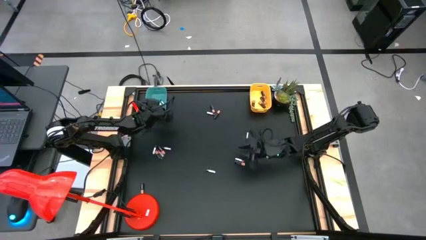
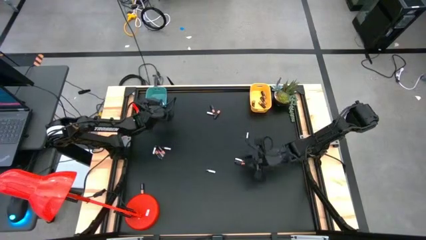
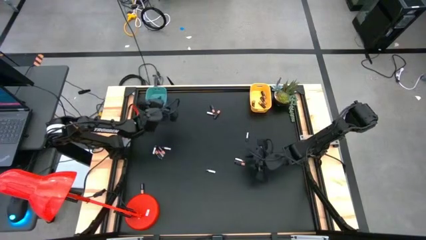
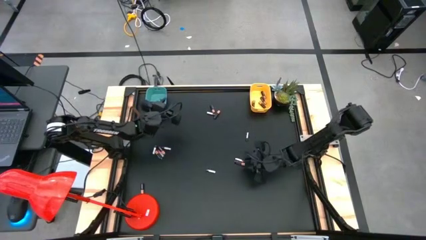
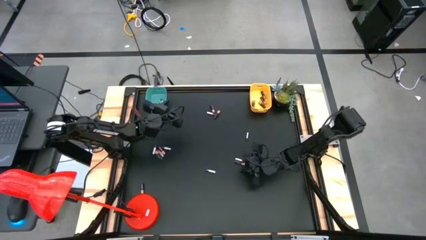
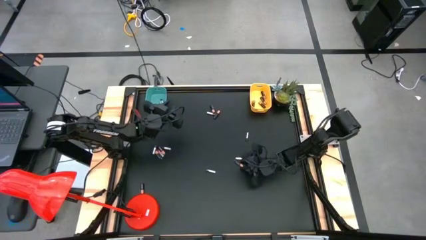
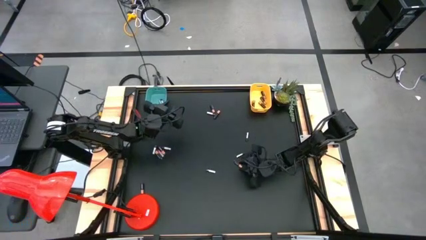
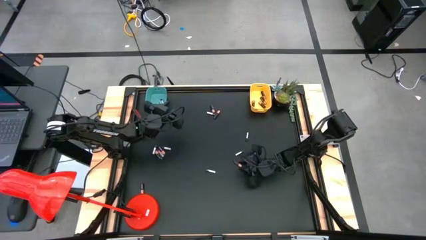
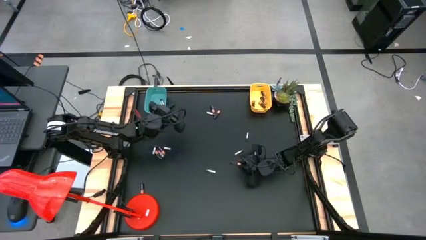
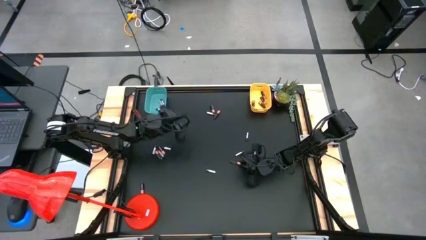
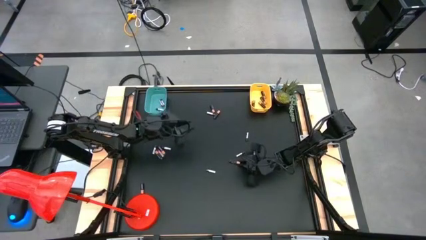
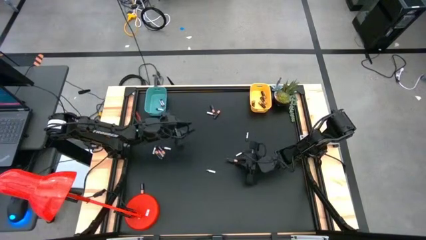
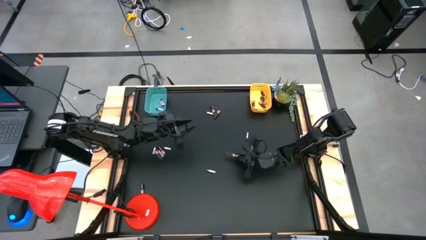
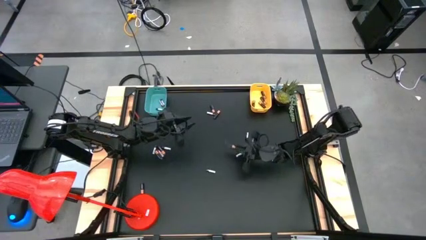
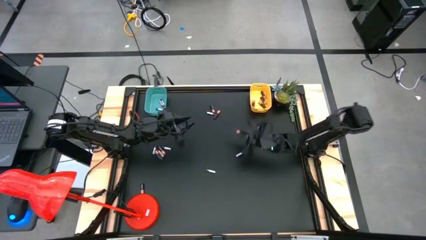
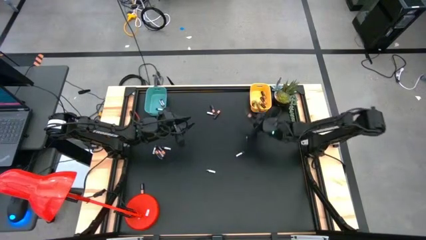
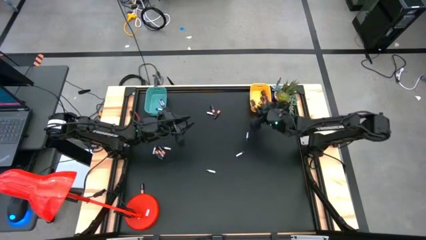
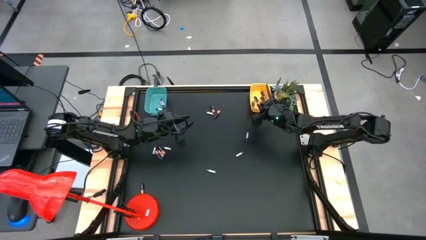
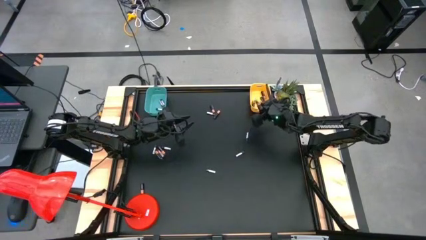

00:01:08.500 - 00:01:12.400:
Task: Sort batteries
Put the black battery into the yellow bin

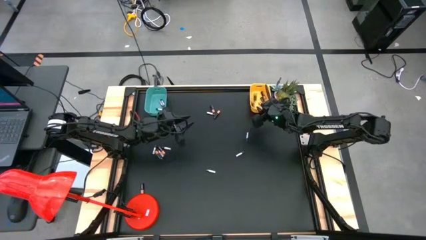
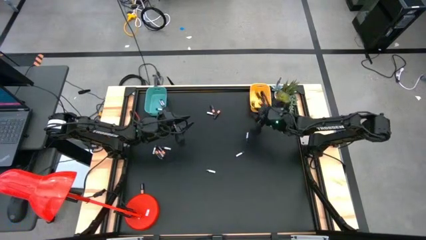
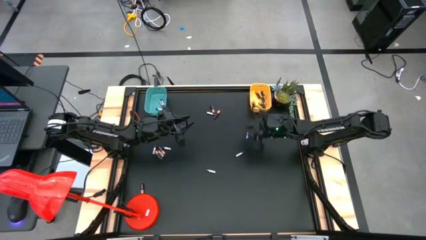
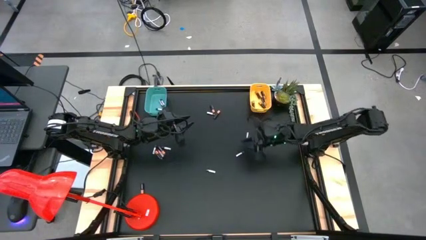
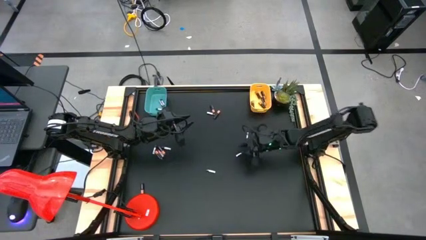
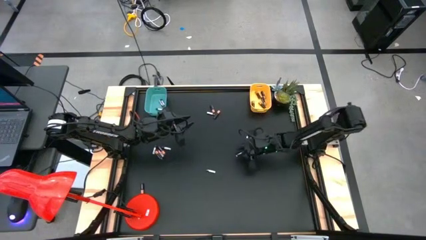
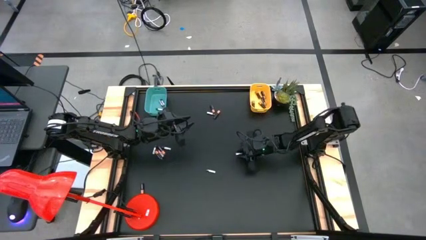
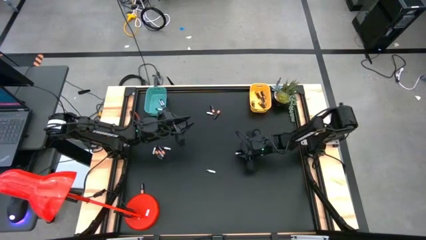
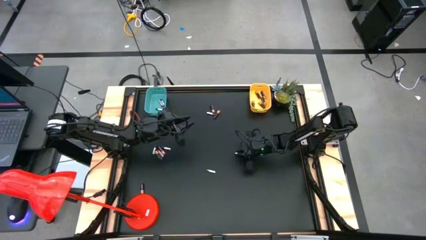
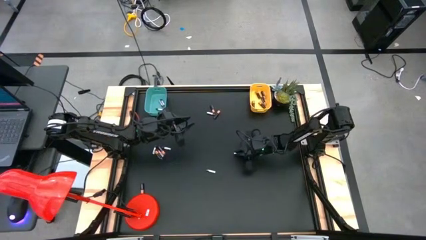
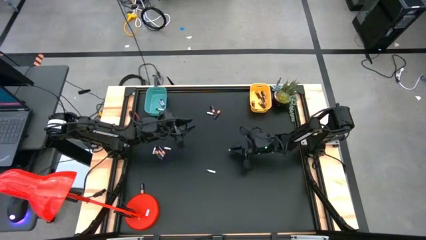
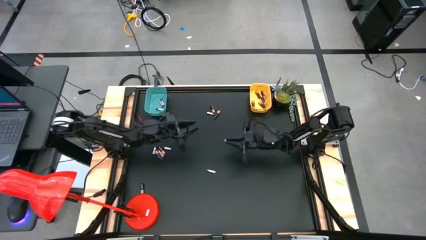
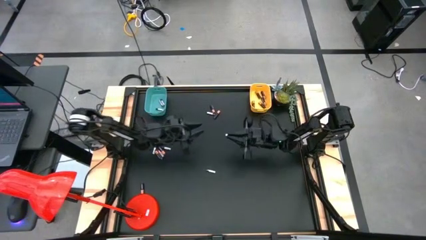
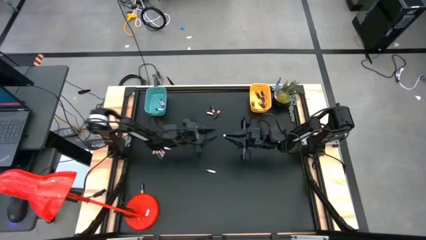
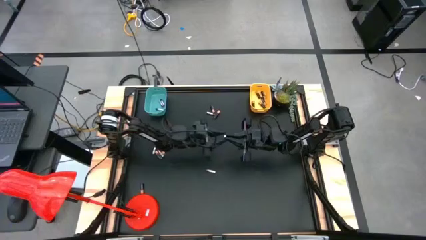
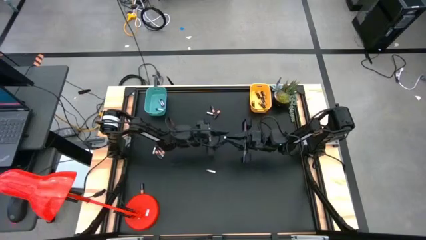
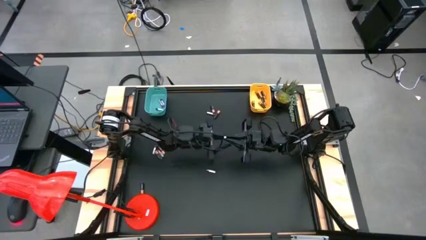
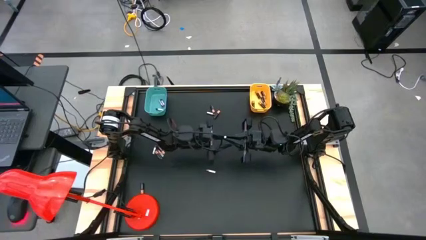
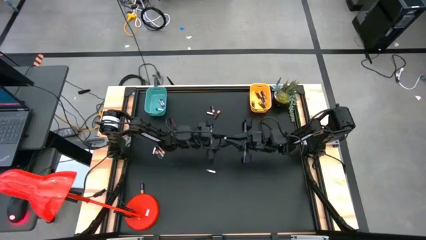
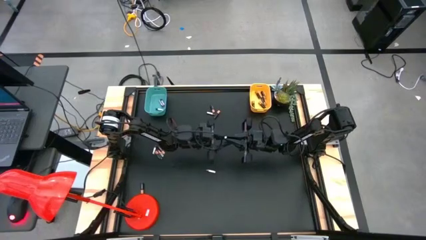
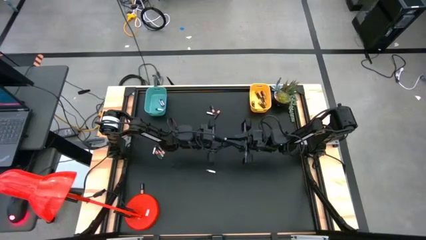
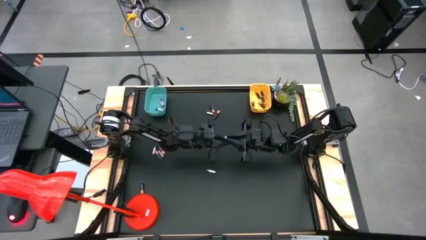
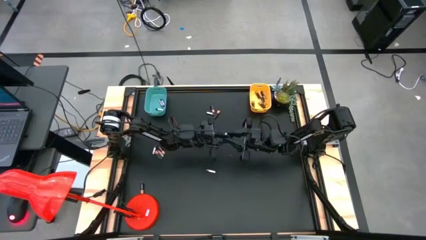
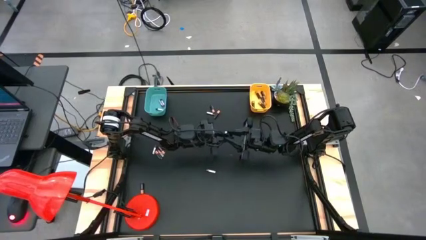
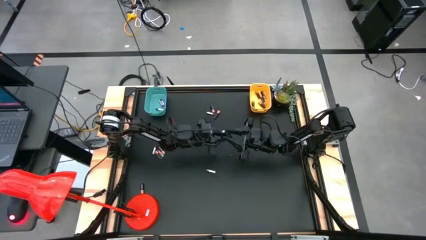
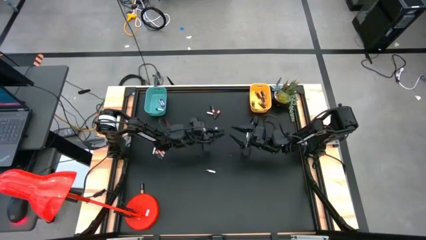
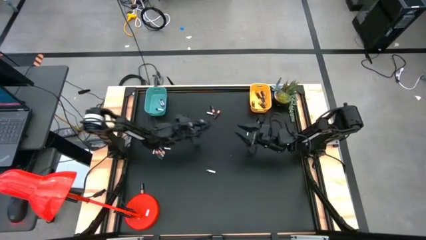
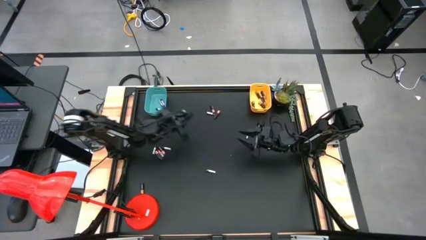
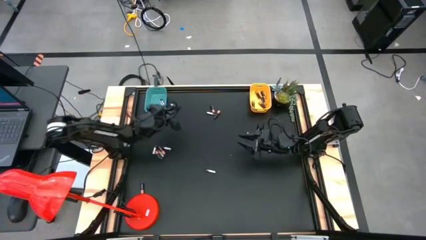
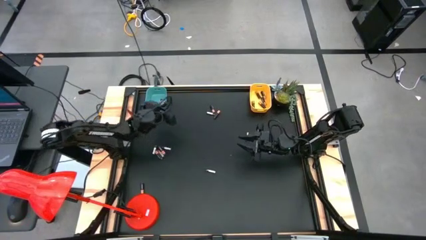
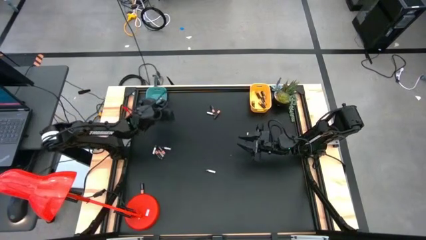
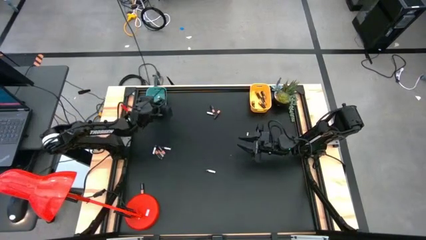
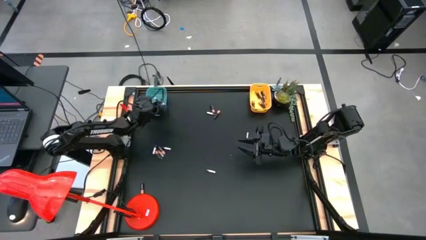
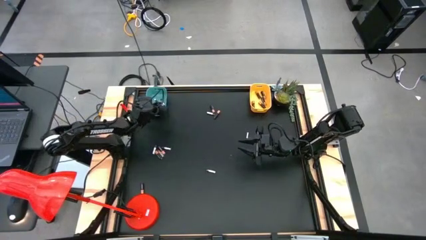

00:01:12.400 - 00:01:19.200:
Put the silver battery into the blue bin
